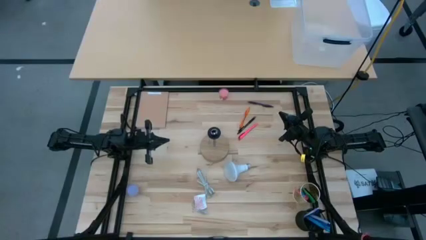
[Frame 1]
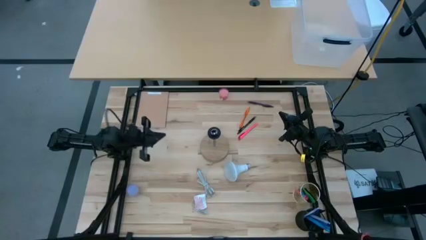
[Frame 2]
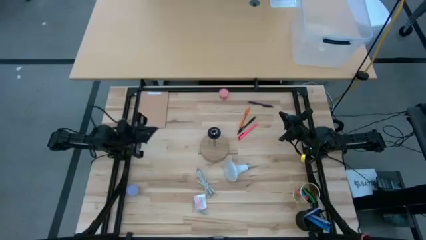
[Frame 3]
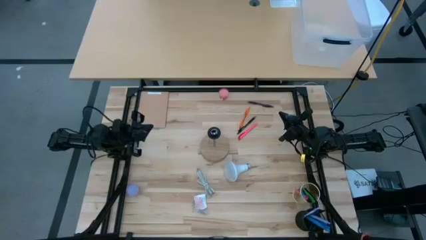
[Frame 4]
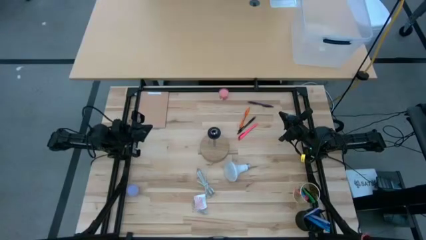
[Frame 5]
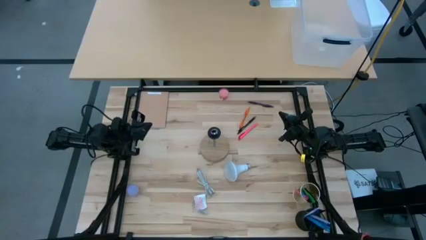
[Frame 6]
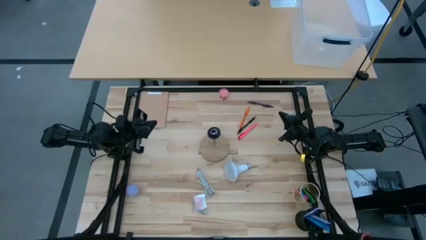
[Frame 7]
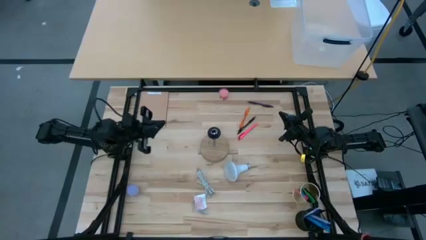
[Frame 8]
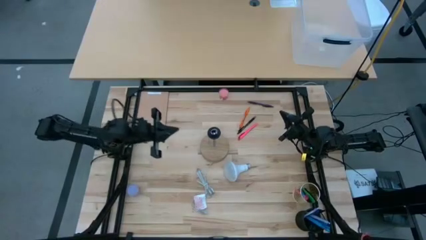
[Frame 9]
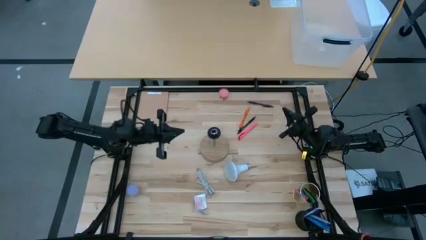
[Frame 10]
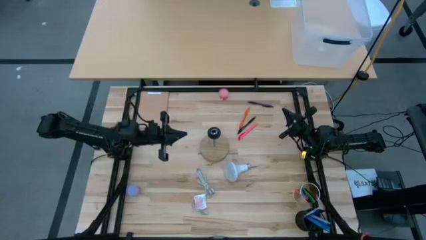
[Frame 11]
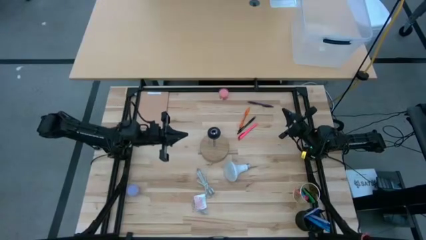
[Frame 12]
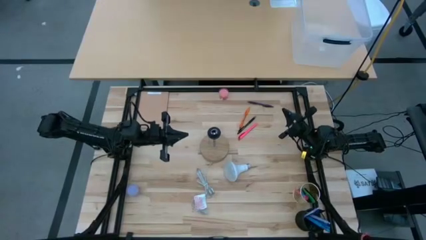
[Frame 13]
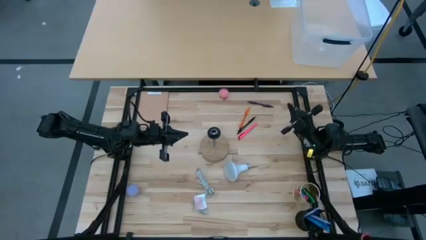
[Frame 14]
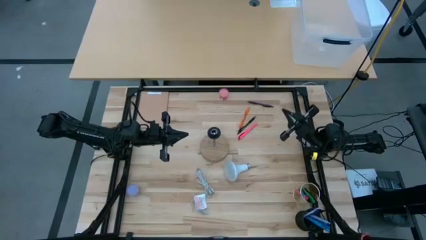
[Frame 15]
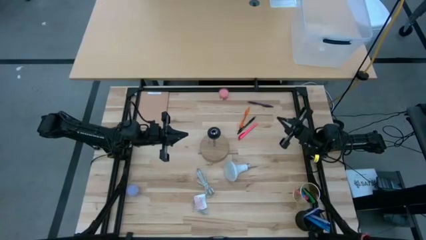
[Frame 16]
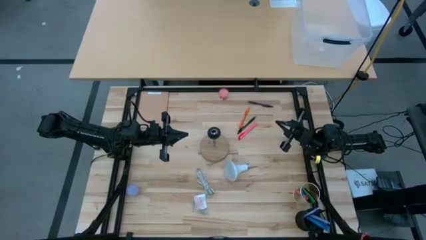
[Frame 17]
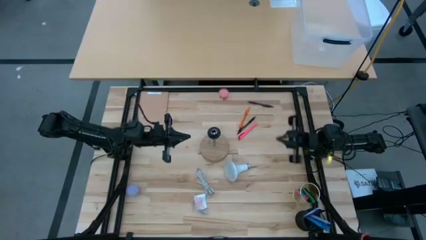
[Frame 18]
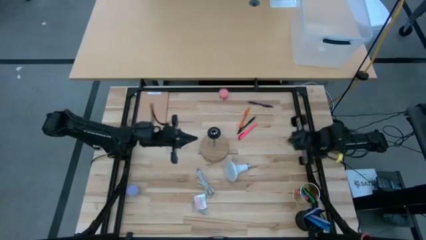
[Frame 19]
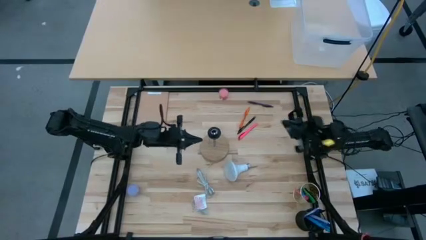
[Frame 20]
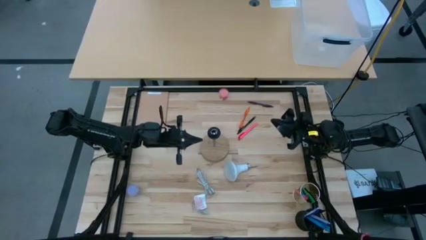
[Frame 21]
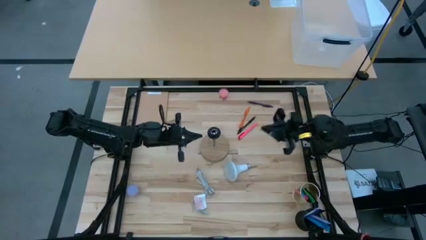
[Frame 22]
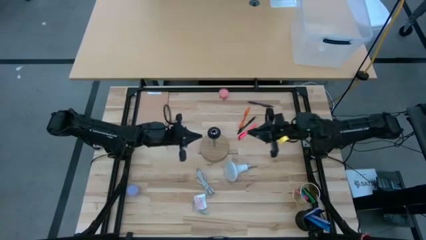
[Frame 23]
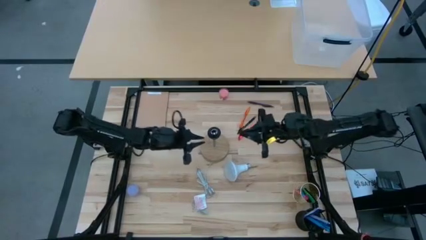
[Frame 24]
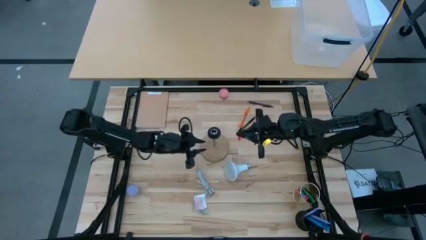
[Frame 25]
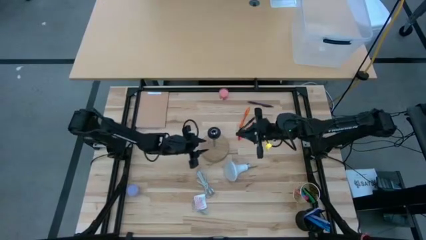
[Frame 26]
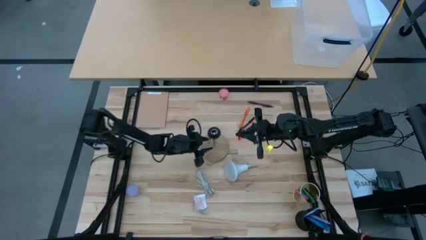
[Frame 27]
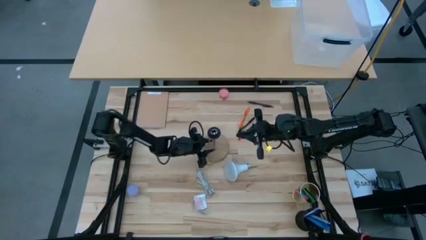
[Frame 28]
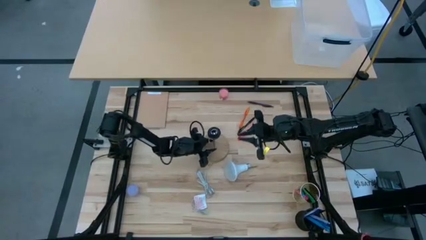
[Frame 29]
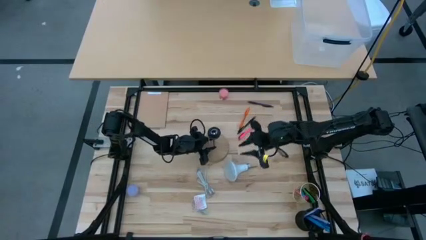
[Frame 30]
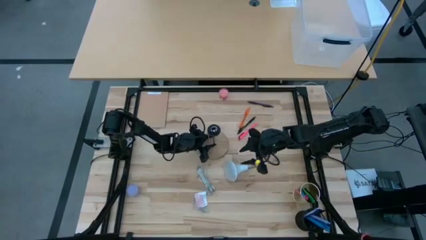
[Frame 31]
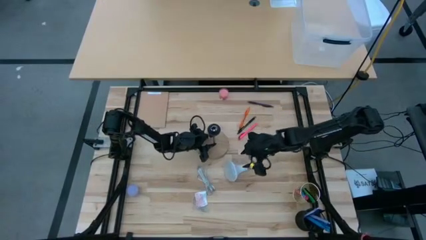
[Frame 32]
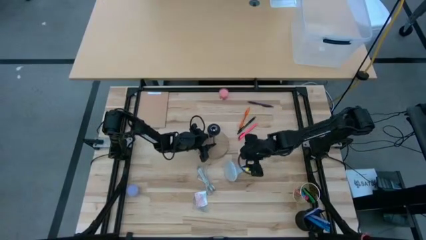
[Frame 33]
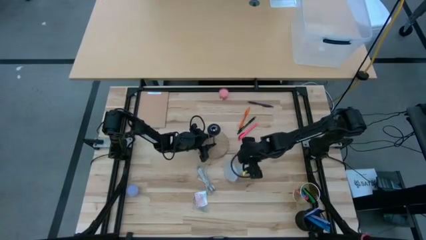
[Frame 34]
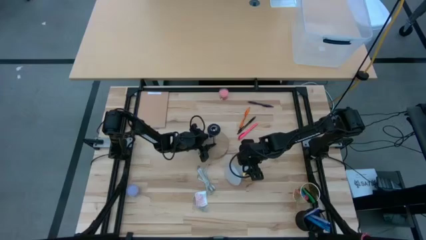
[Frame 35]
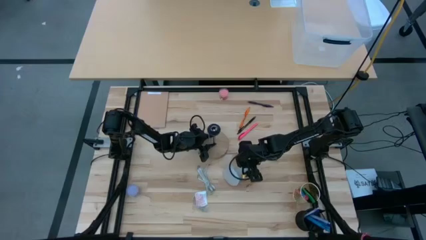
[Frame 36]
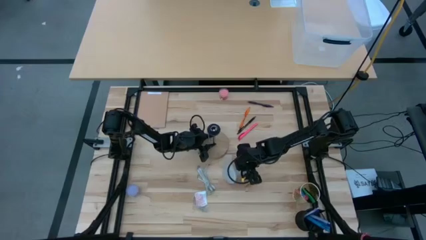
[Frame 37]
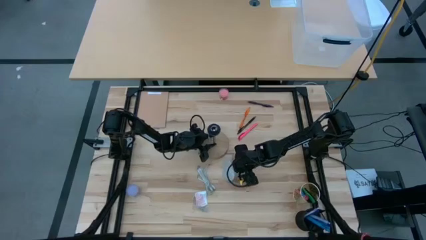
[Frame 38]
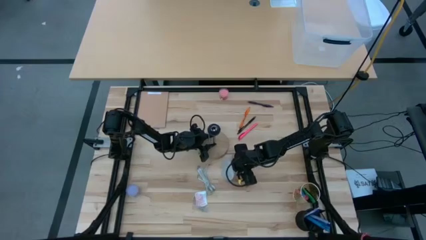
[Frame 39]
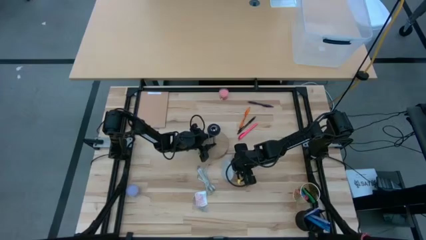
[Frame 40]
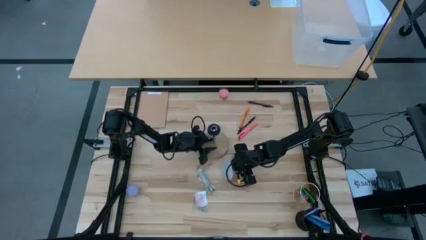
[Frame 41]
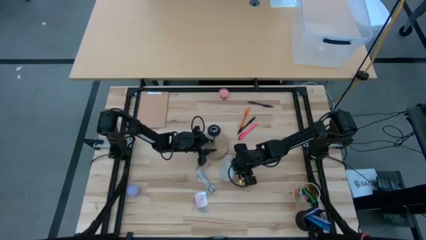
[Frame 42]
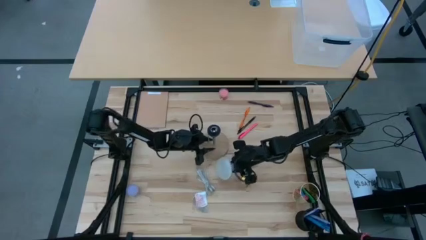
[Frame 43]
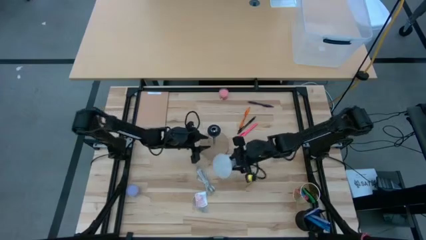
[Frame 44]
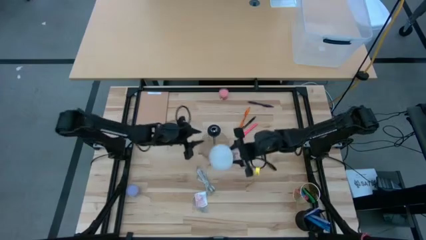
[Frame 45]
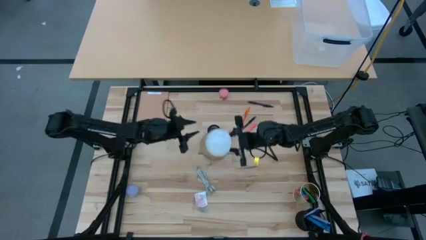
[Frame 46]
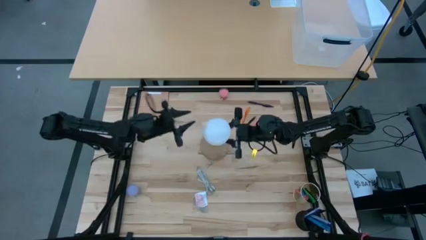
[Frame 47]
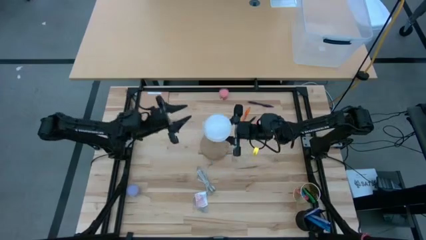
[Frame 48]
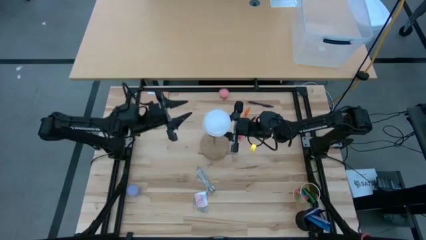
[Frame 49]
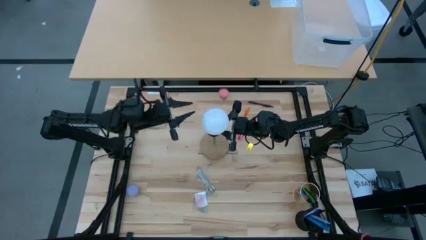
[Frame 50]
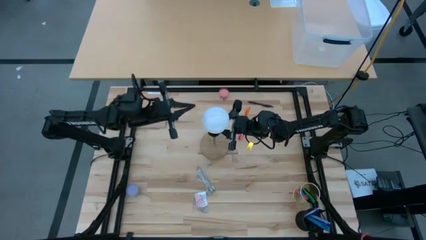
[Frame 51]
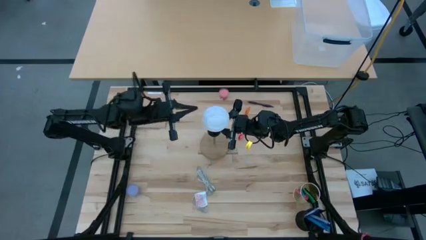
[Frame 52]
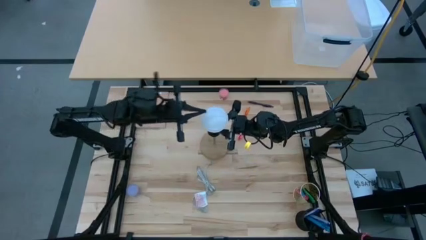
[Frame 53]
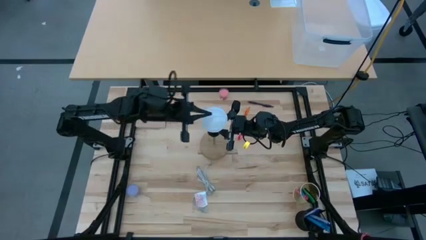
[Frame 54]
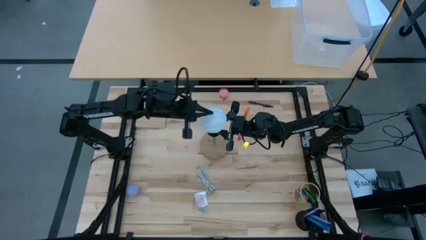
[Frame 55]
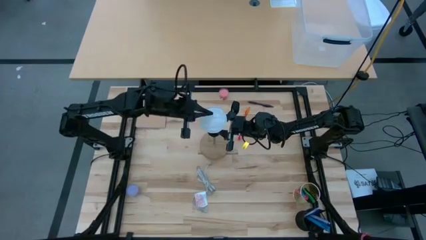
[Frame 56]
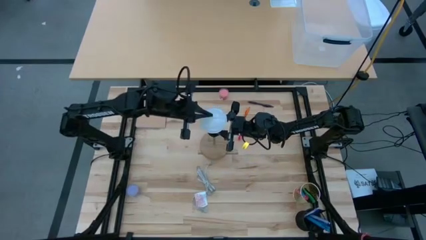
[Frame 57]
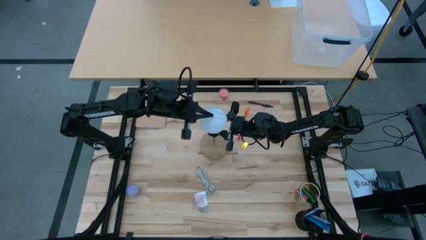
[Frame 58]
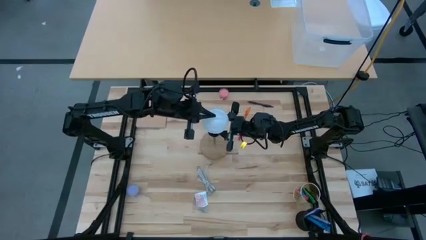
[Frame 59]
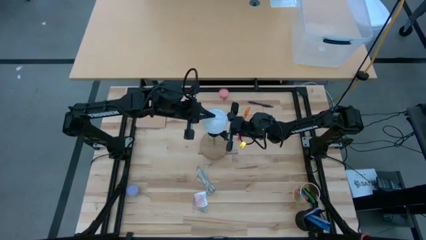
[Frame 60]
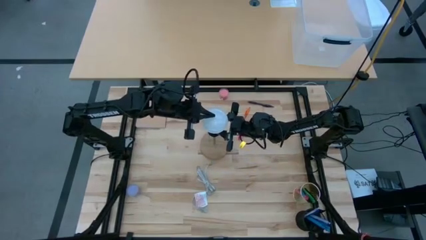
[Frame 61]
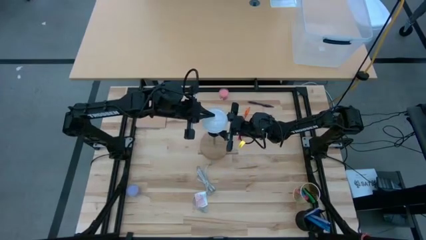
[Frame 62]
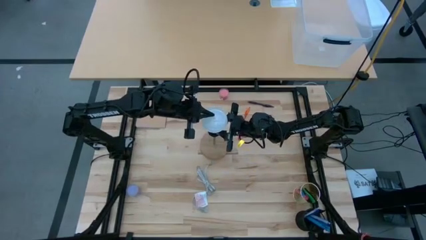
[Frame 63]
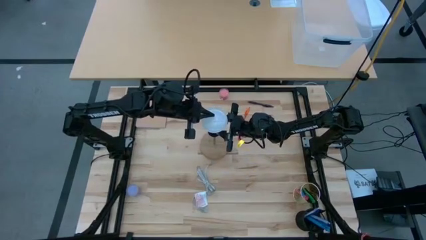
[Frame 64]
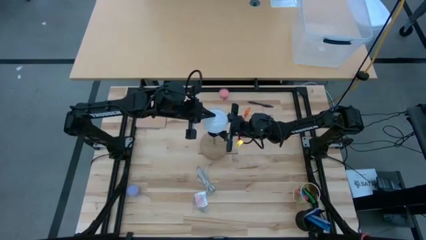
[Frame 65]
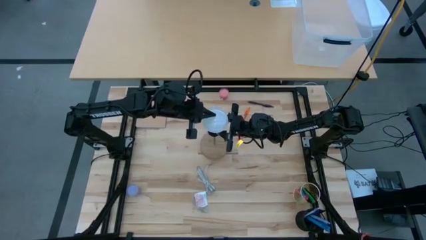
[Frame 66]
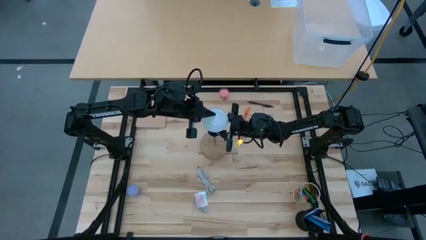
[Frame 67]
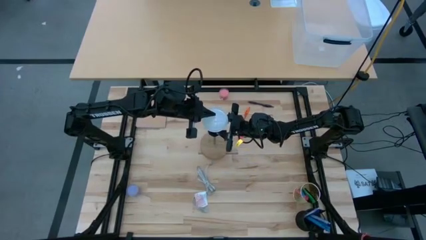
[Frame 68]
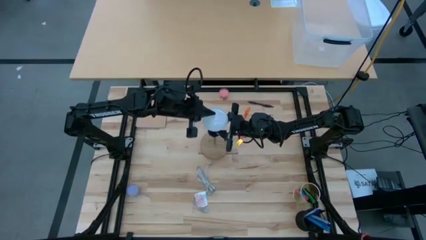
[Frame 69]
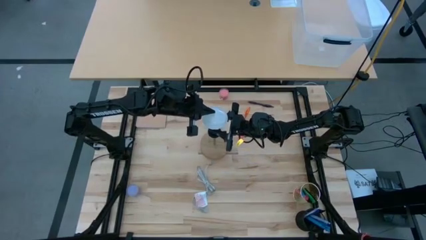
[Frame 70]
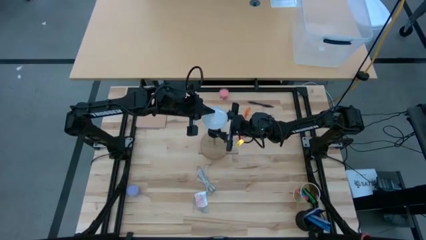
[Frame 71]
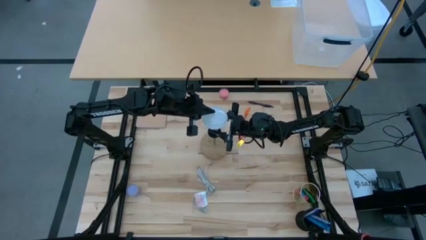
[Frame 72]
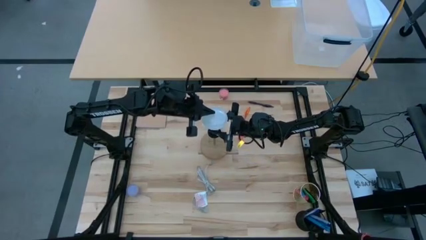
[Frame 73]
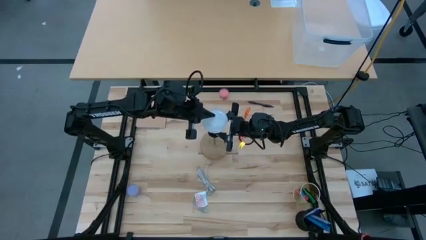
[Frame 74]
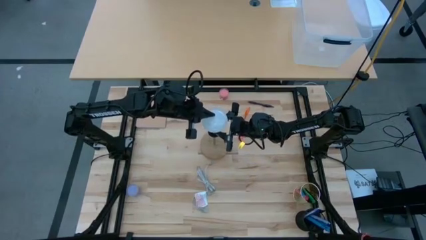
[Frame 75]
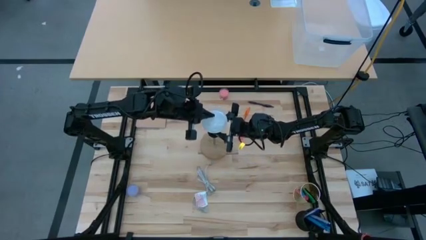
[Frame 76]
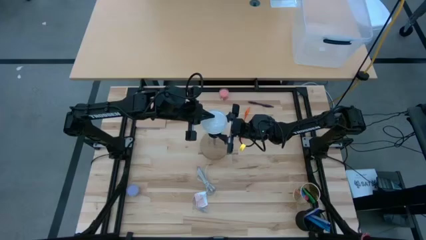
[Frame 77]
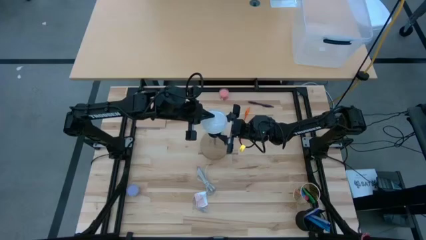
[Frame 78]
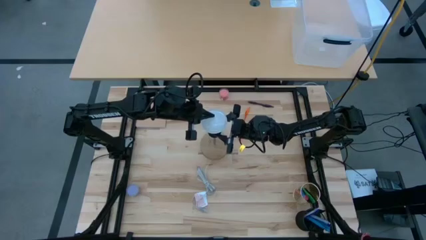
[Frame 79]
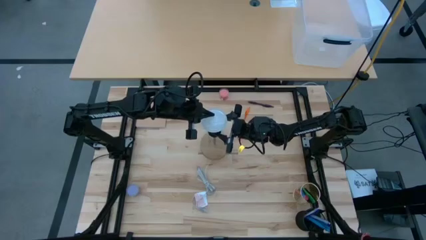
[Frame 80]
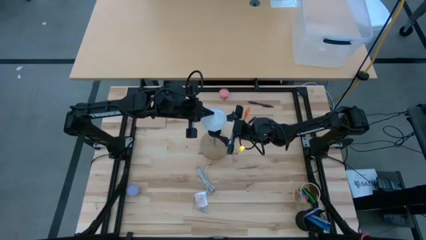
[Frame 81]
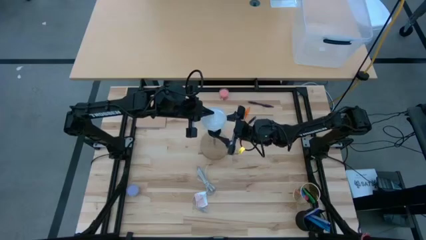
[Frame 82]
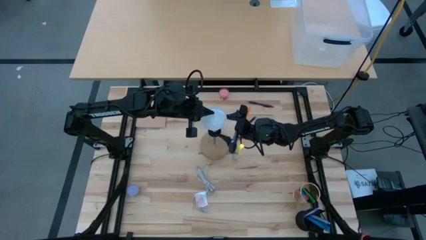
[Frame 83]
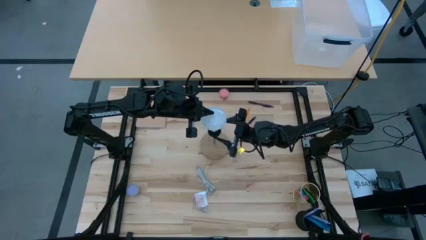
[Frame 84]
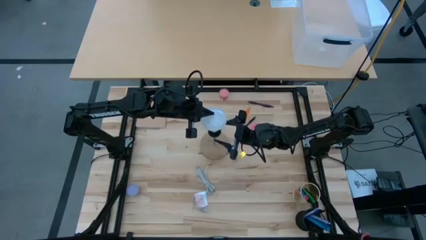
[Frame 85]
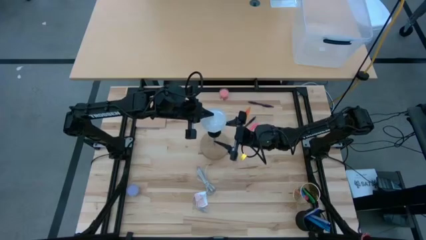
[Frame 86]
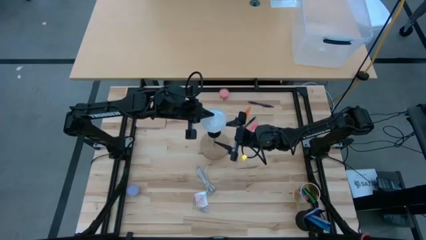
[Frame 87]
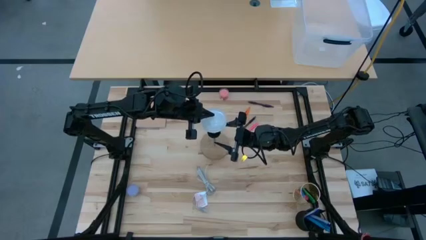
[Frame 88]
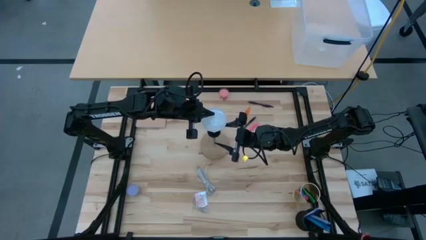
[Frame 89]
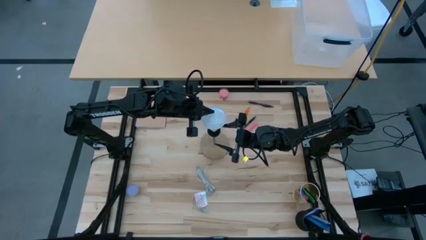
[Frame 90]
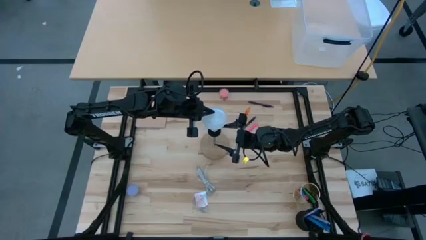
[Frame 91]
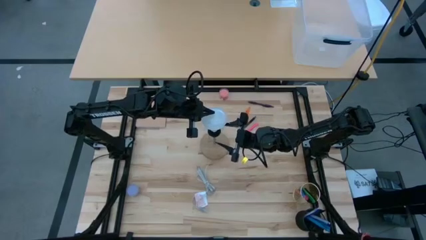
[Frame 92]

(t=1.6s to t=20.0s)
Task: Screw lightbulb
Insert the white lightbulb into the desk lamp
